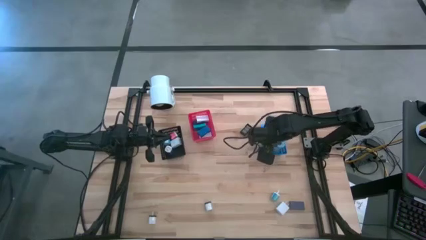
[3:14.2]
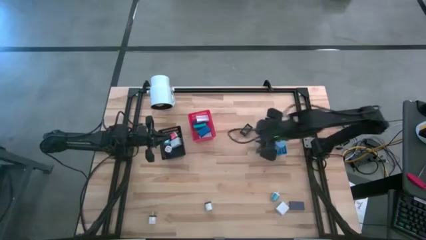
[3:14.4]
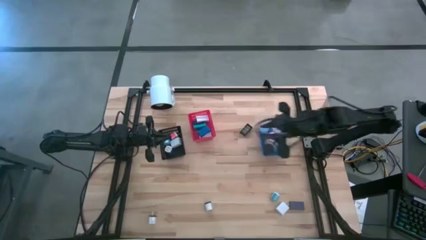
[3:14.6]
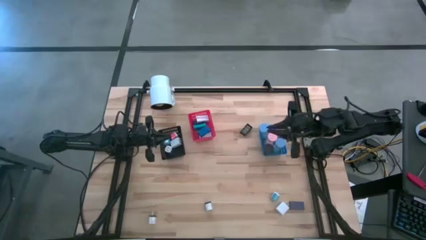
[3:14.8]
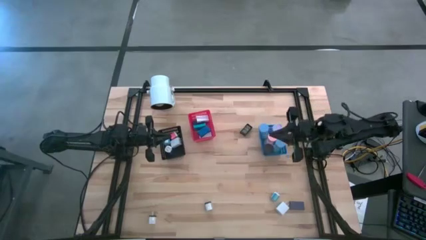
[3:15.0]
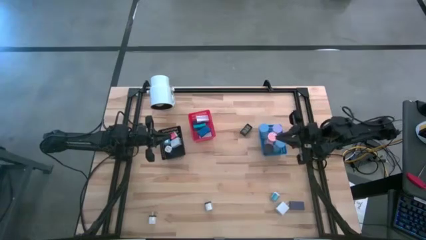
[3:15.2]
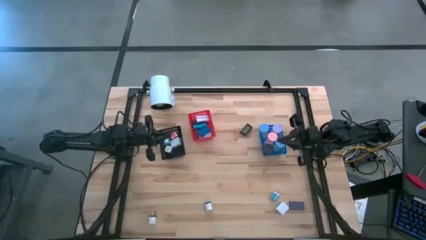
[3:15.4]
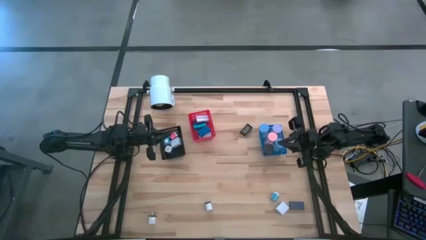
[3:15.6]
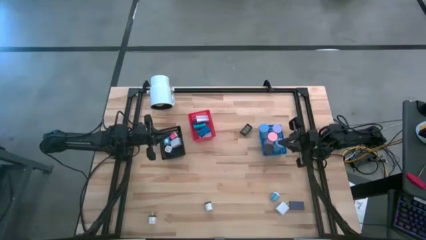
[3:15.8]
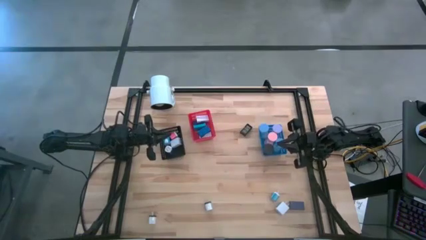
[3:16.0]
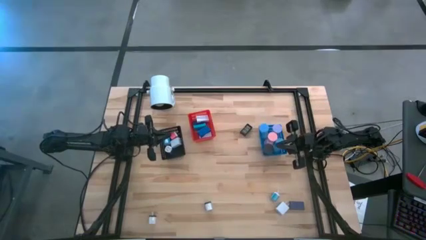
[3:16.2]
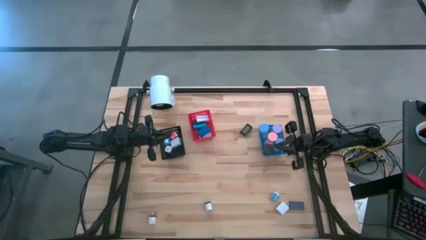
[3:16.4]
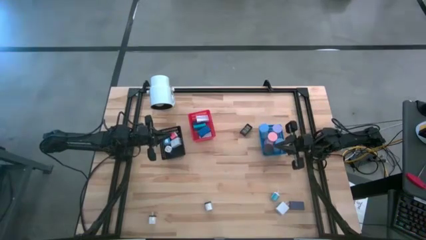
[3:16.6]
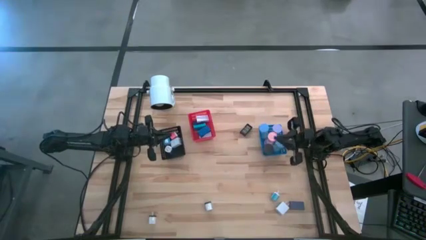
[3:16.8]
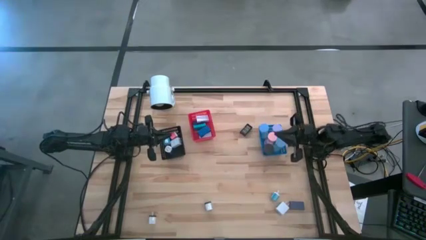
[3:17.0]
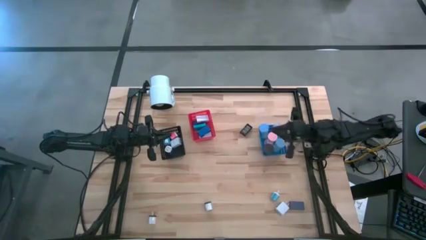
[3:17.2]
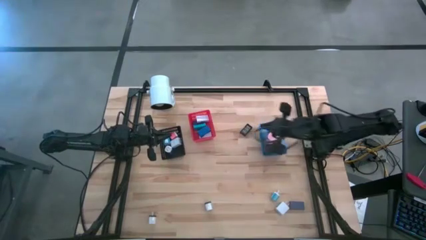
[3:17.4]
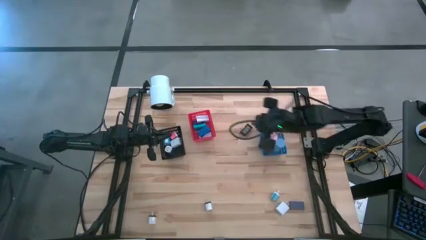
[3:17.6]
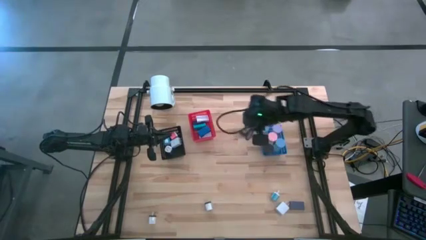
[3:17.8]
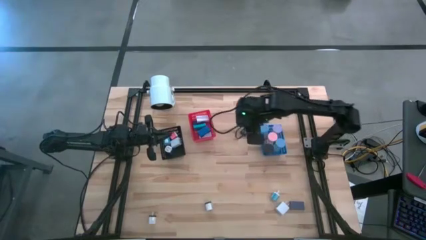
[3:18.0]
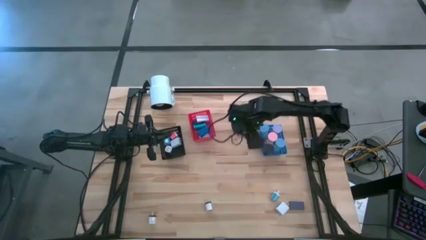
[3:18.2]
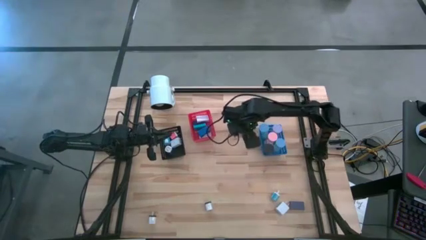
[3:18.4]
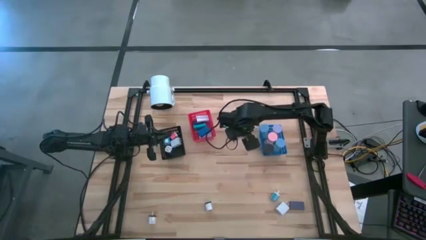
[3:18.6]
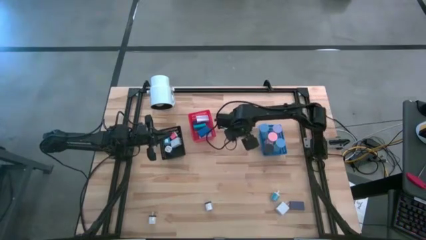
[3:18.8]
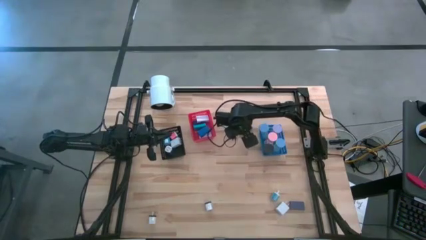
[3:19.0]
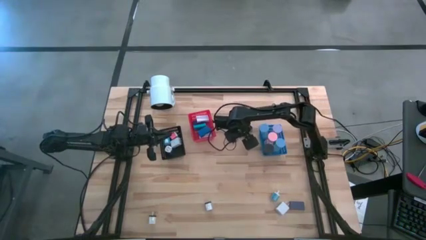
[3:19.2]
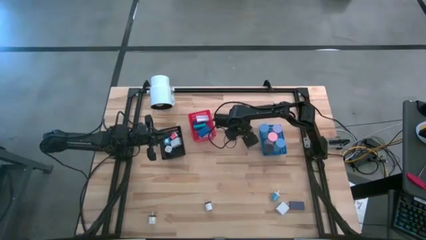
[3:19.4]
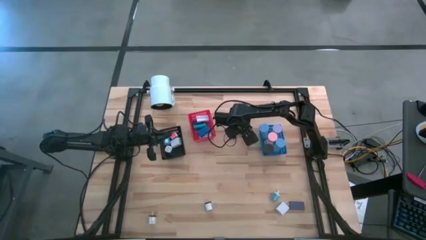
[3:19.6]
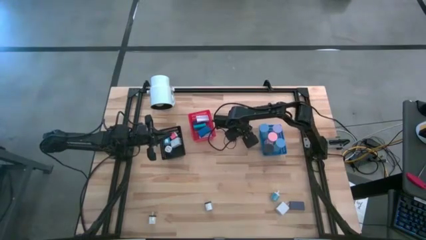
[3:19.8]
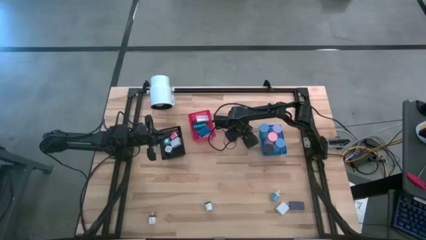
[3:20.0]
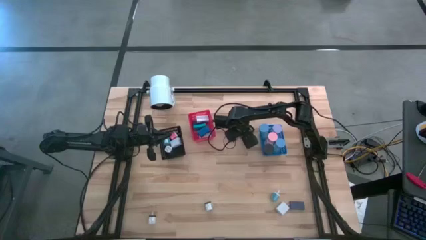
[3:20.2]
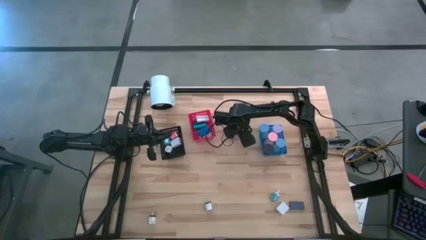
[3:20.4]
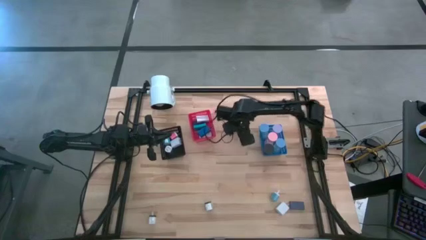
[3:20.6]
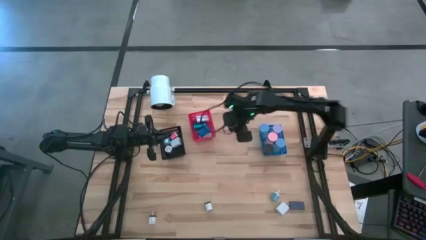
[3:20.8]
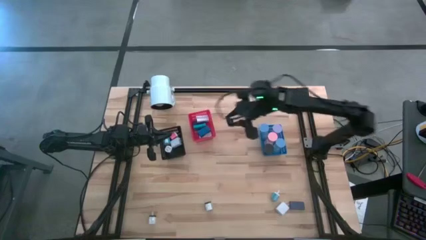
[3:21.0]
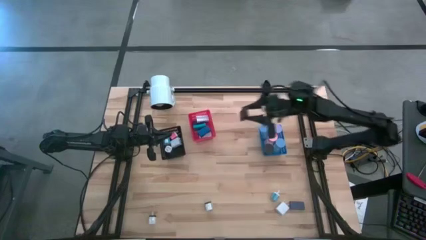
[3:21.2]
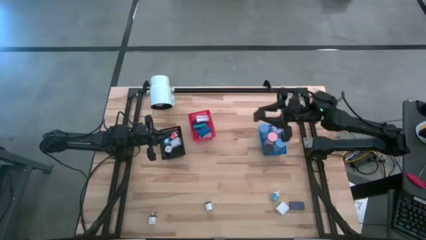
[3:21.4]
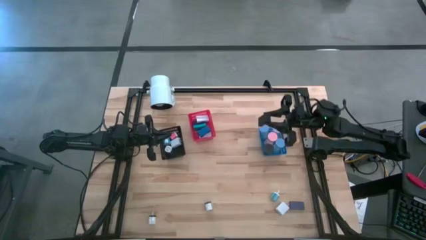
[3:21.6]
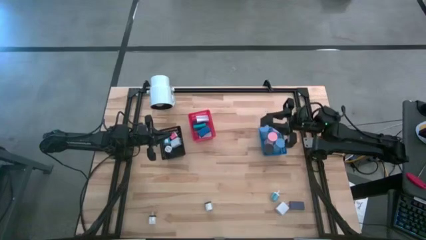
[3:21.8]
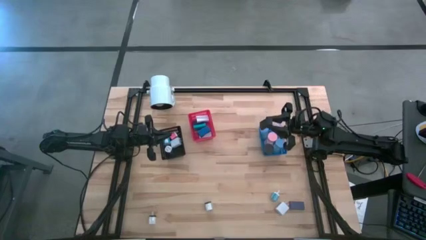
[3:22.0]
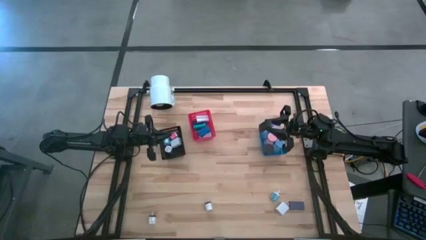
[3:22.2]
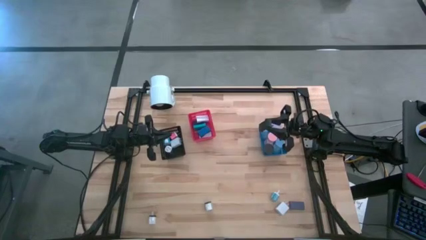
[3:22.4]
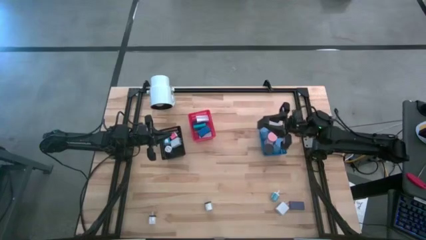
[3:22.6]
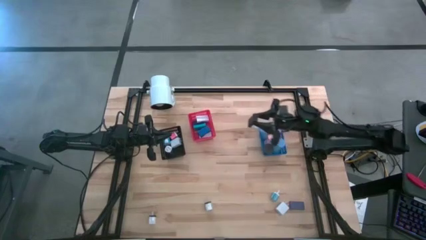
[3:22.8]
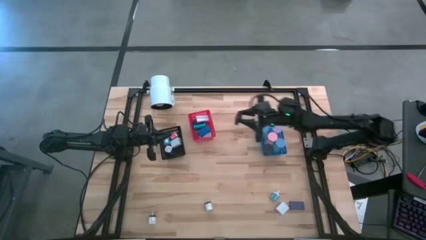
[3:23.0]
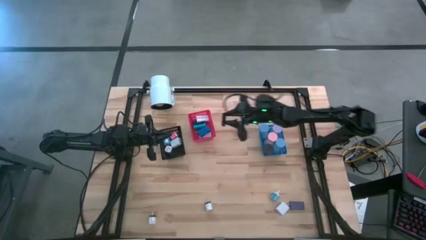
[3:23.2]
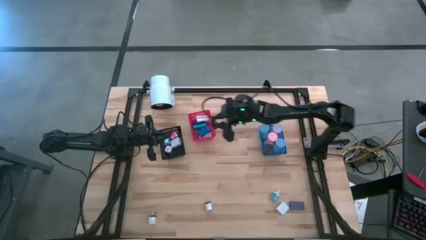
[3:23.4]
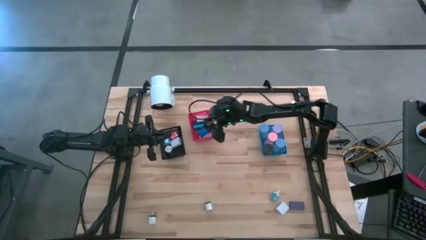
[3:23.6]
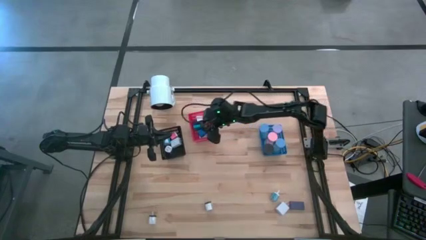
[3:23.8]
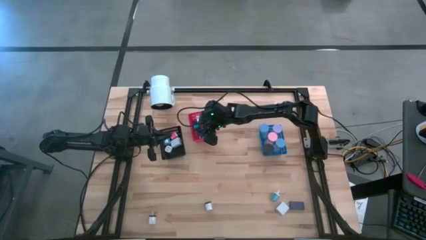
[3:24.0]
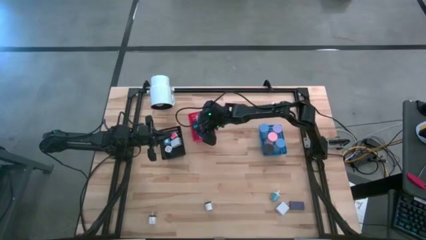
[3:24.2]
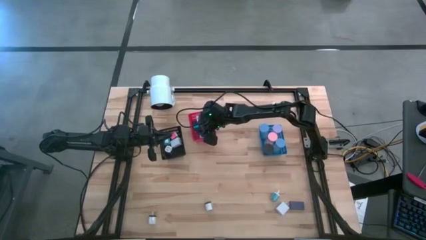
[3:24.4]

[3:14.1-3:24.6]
Task: Pick & Place Office items
Put the black digital clock into the red bin

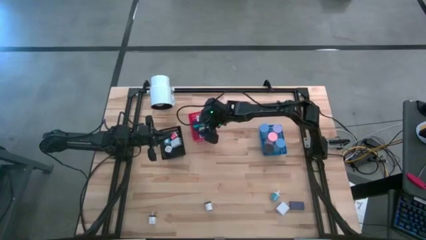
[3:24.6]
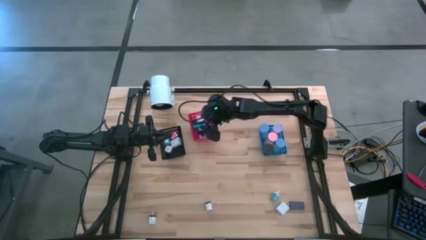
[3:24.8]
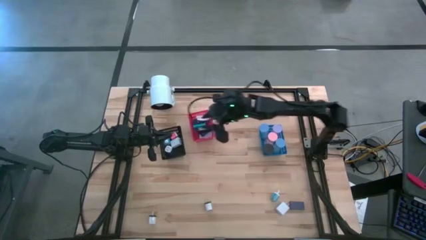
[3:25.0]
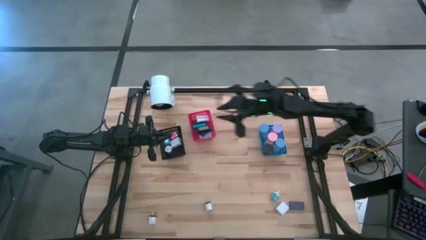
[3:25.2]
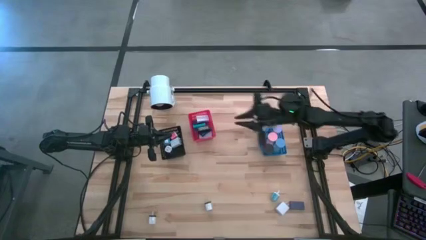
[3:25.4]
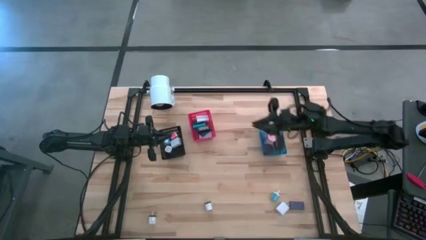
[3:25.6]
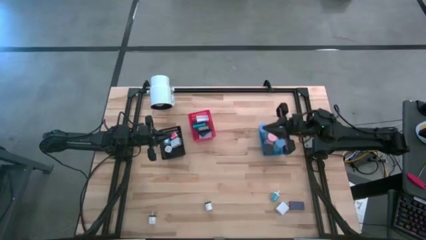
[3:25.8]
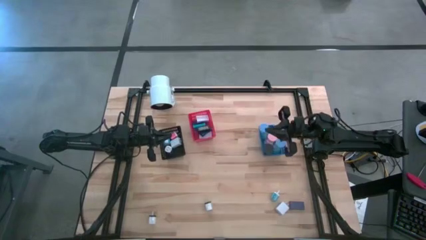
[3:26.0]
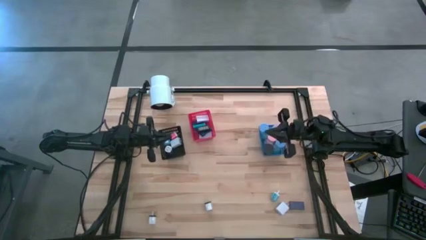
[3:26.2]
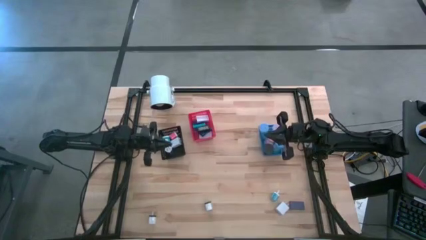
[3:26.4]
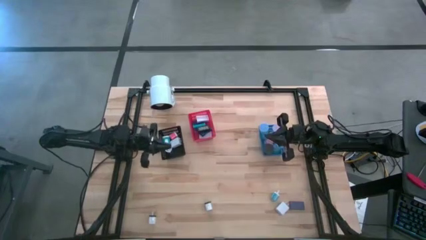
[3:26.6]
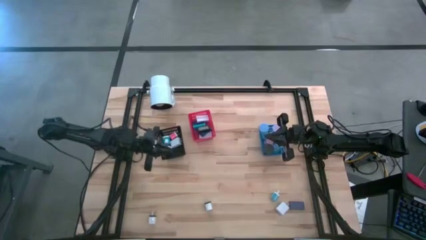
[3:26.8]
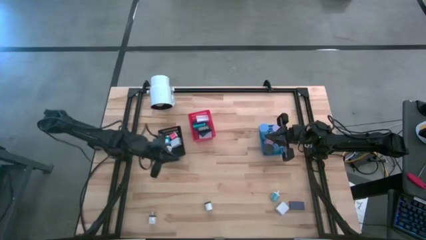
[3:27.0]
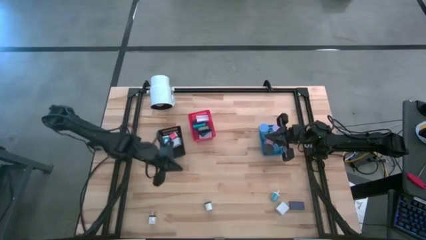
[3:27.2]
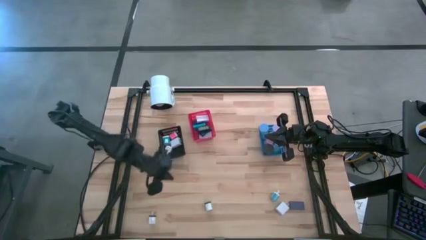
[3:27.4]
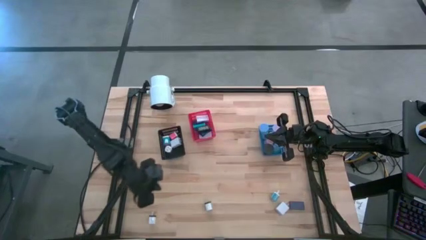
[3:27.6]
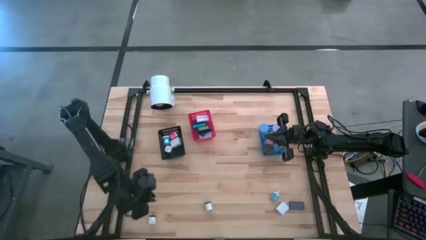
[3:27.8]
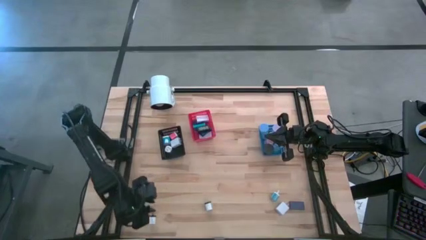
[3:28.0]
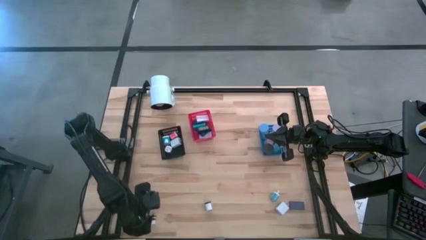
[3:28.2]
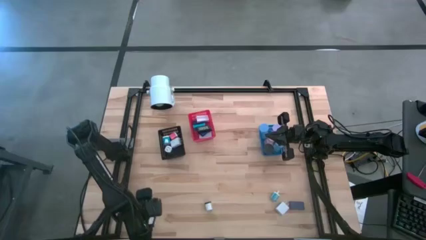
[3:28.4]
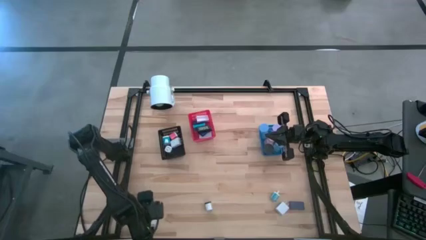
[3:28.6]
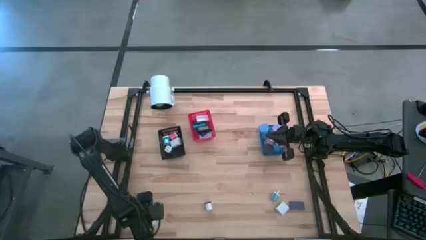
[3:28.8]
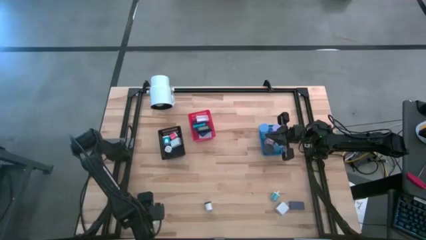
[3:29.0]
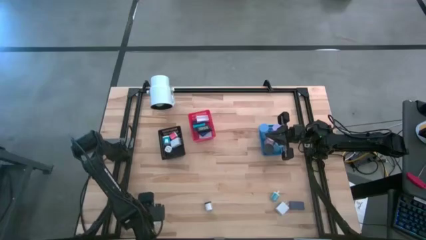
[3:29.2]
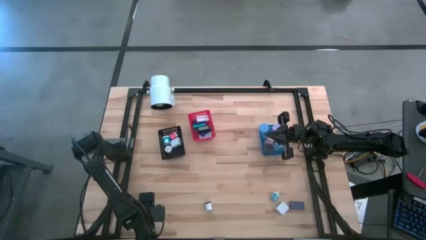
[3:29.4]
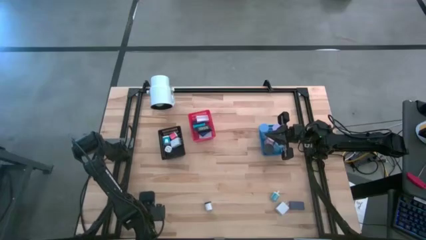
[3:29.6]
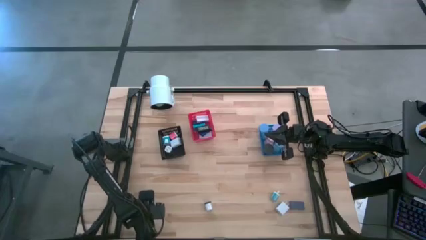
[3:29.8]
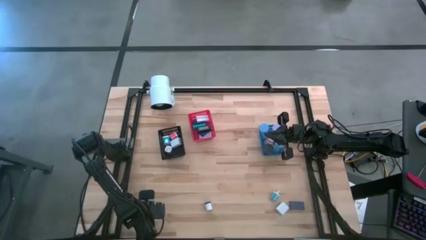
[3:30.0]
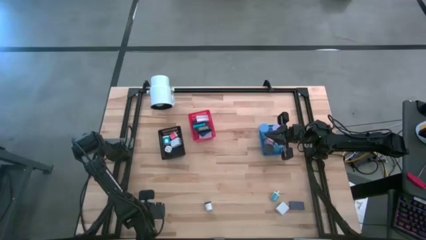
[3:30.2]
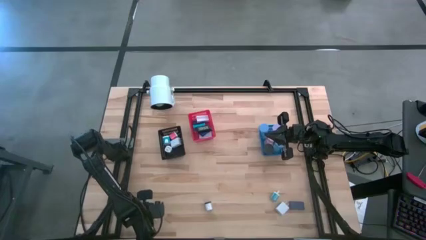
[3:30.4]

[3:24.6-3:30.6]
Put the left white black charger adapter into the black bin
